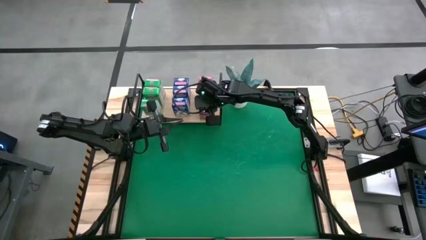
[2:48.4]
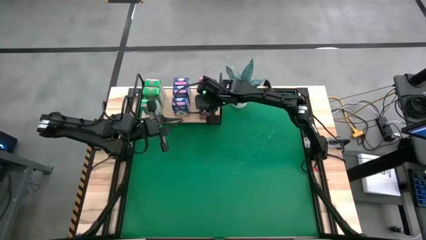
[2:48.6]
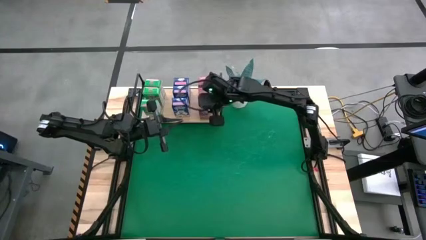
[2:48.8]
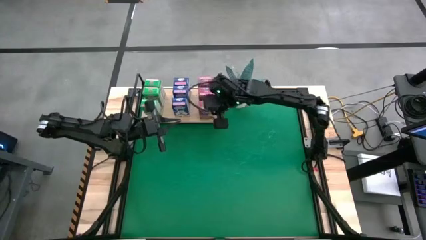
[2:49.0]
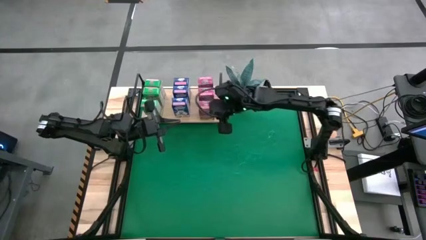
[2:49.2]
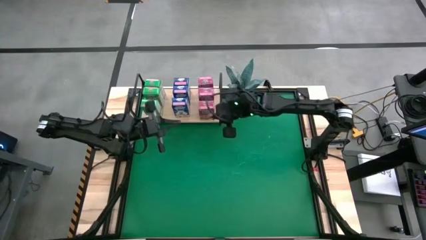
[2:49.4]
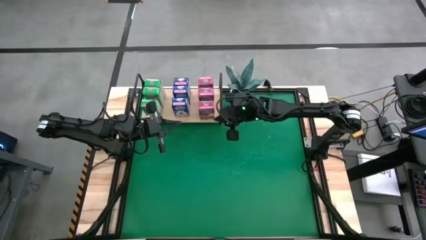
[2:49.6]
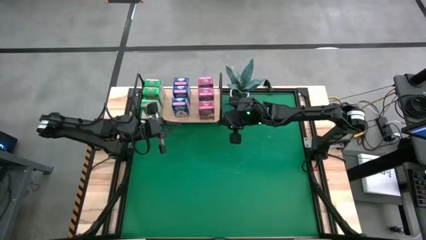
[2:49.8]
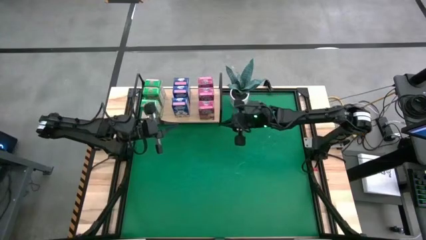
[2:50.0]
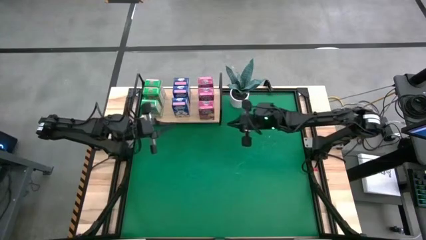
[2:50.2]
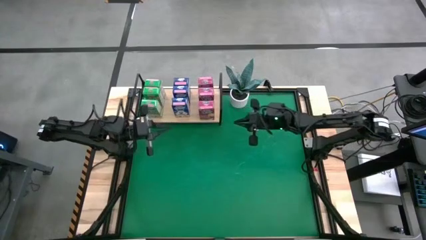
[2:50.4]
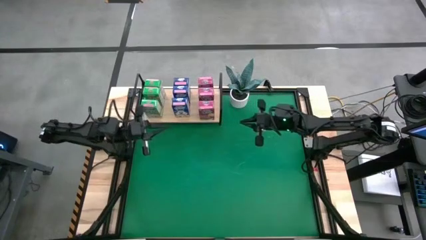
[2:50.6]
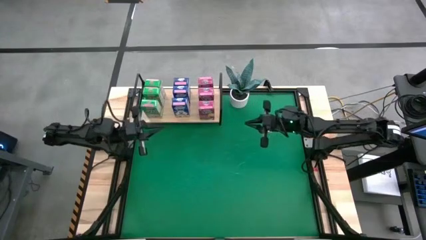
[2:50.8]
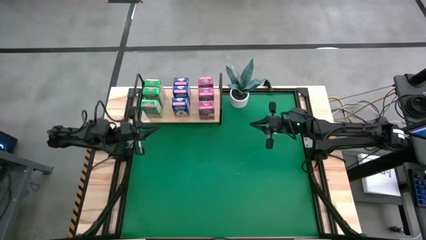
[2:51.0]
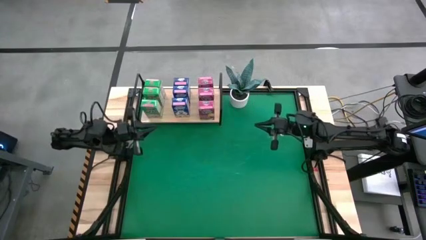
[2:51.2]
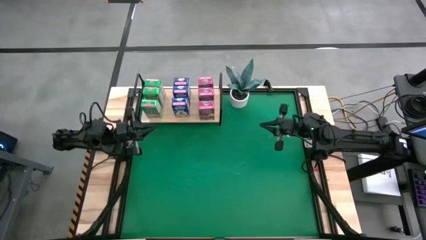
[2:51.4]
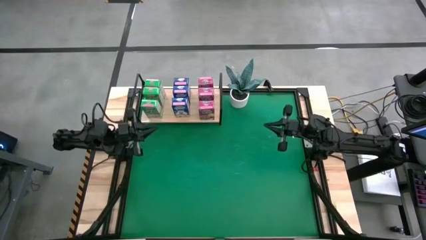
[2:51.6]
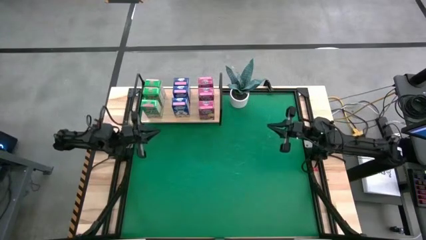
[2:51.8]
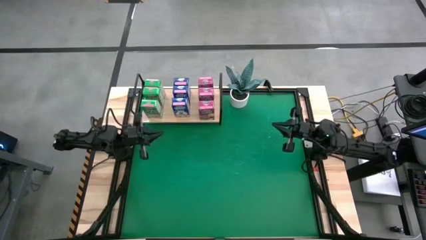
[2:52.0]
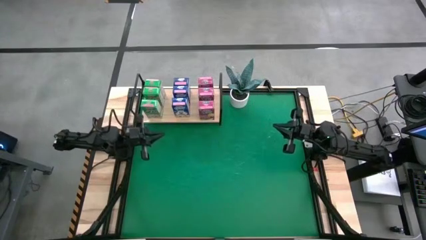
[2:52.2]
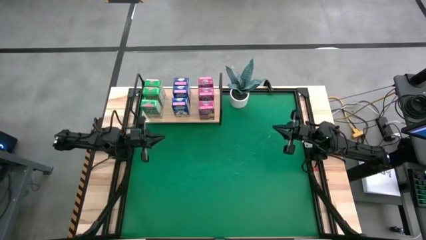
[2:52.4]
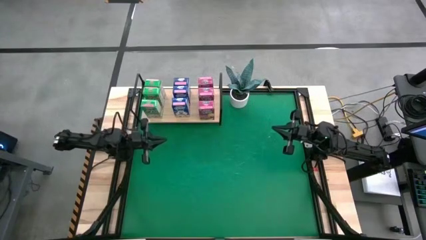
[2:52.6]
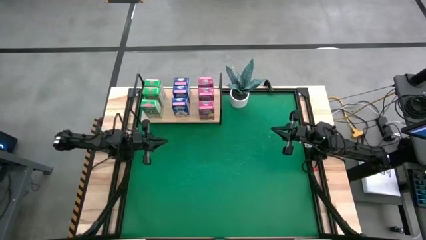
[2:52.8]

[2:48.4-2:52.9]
Task: Stack cereal on shelf
Return to Home Position

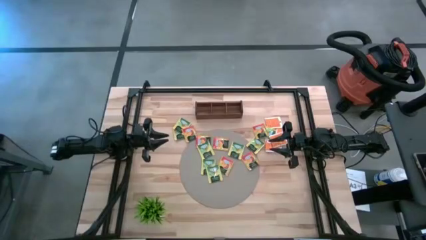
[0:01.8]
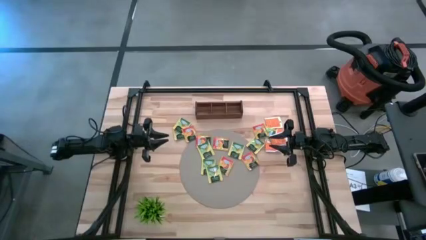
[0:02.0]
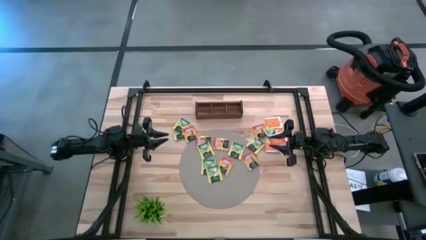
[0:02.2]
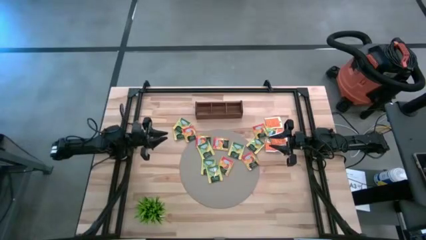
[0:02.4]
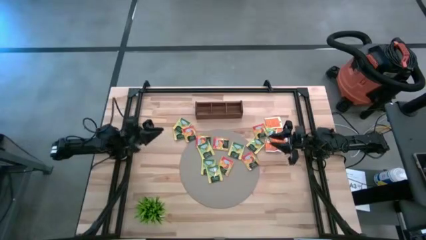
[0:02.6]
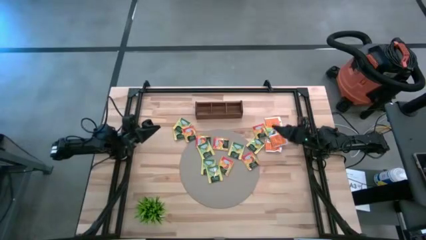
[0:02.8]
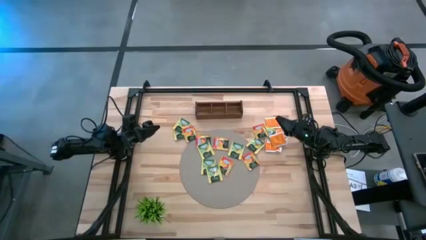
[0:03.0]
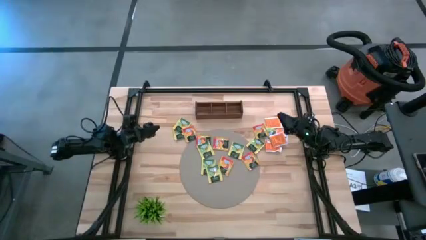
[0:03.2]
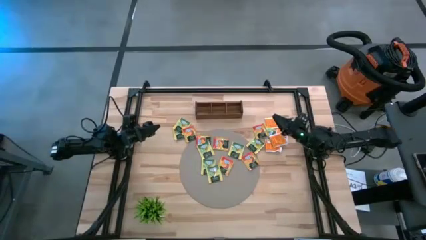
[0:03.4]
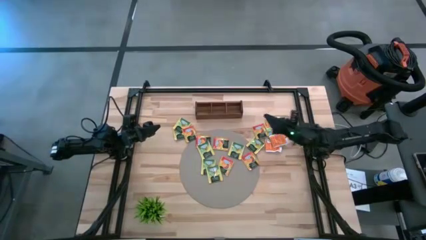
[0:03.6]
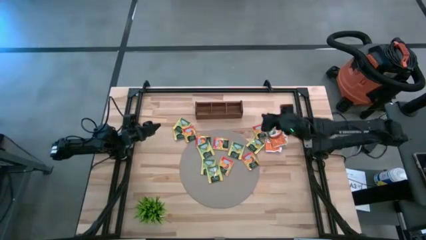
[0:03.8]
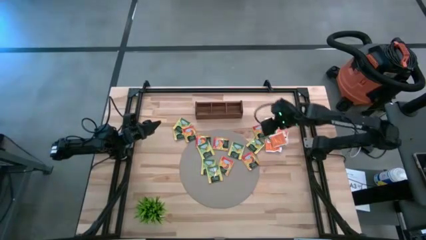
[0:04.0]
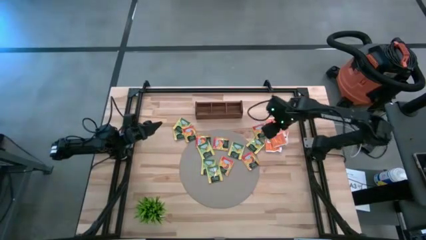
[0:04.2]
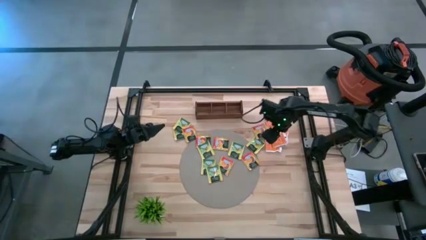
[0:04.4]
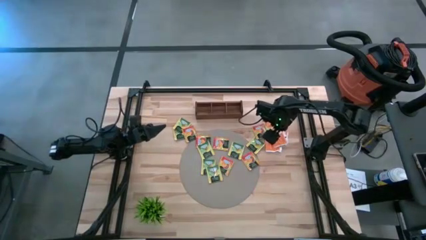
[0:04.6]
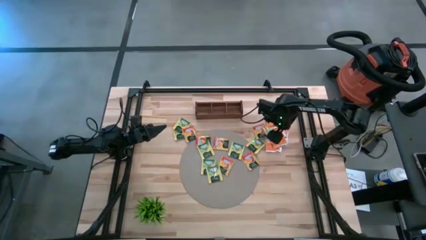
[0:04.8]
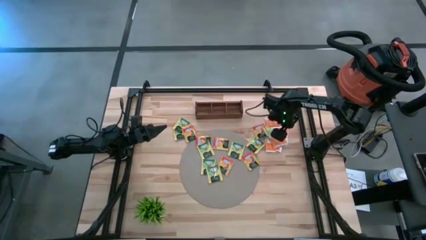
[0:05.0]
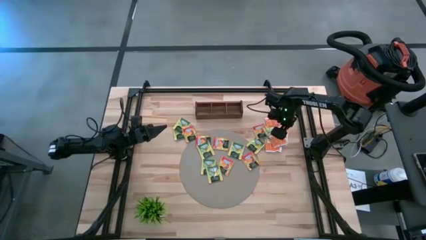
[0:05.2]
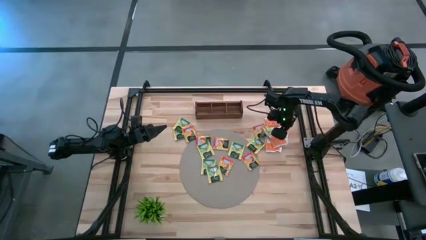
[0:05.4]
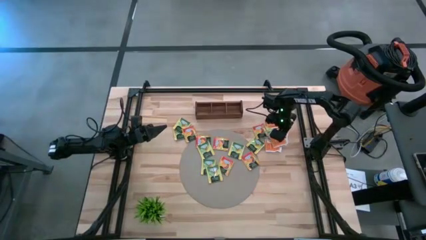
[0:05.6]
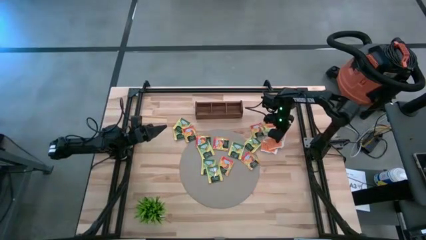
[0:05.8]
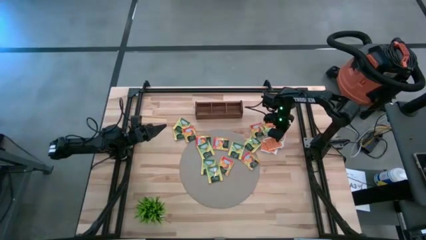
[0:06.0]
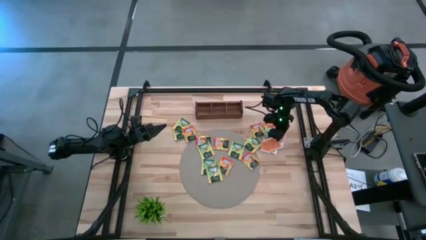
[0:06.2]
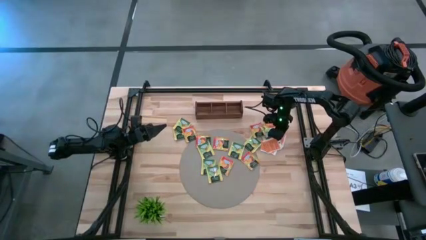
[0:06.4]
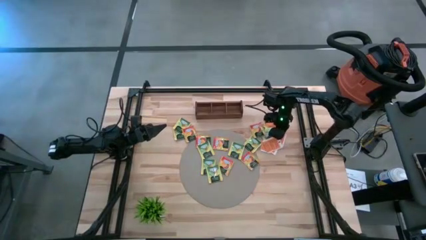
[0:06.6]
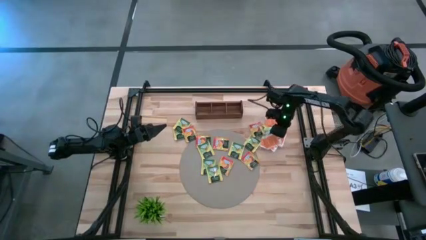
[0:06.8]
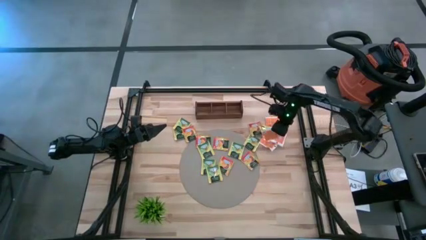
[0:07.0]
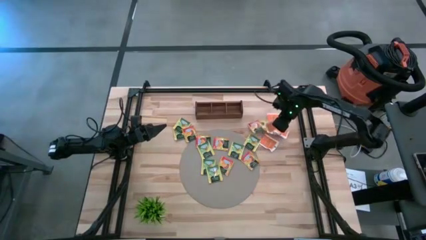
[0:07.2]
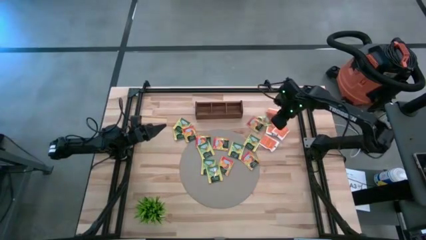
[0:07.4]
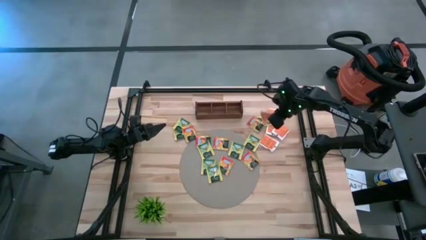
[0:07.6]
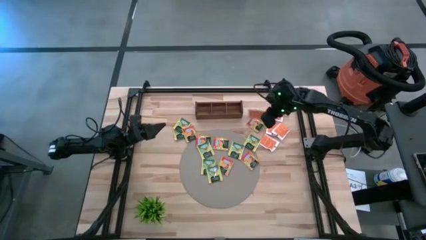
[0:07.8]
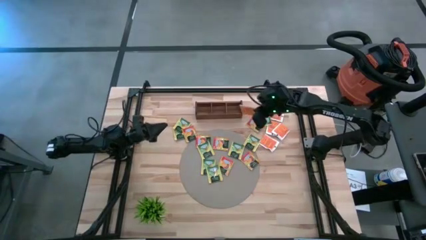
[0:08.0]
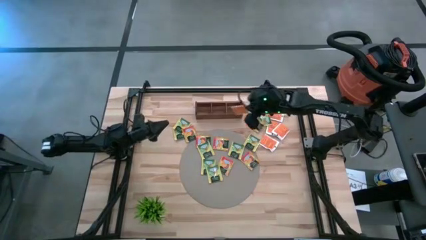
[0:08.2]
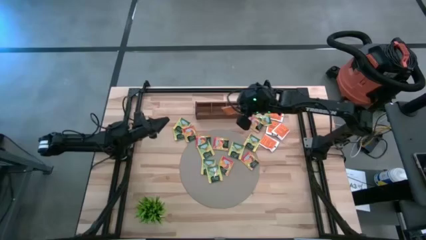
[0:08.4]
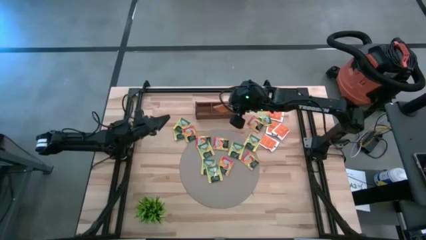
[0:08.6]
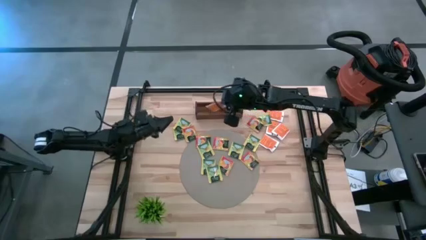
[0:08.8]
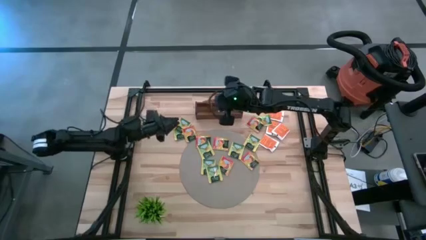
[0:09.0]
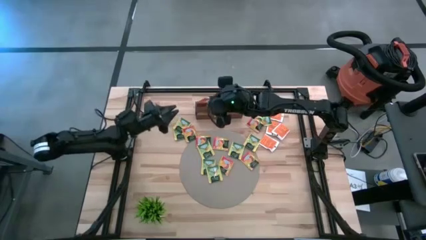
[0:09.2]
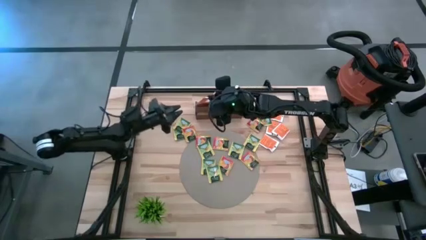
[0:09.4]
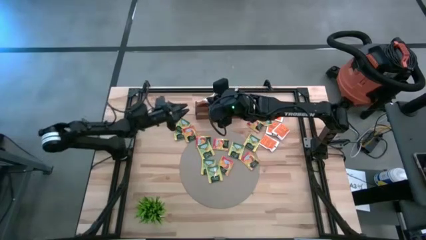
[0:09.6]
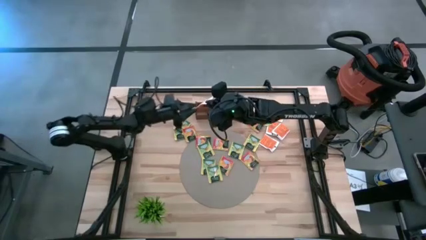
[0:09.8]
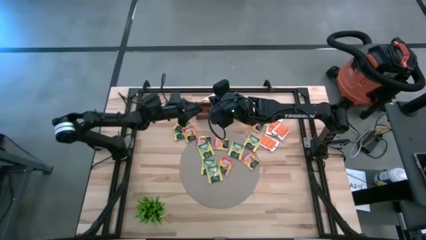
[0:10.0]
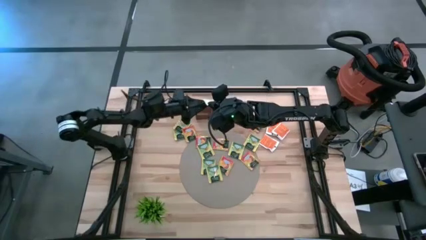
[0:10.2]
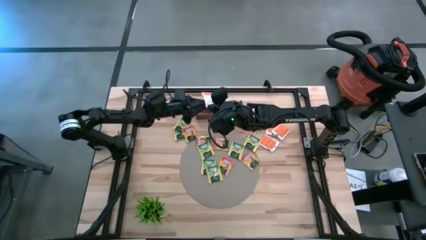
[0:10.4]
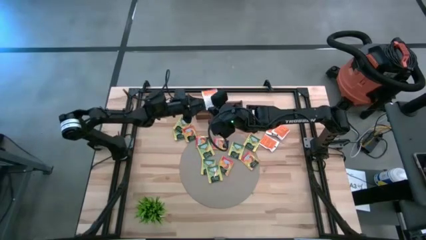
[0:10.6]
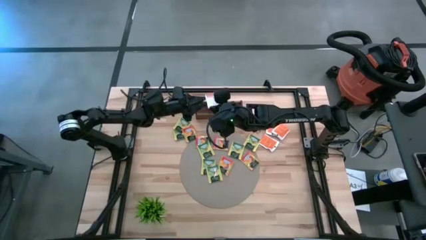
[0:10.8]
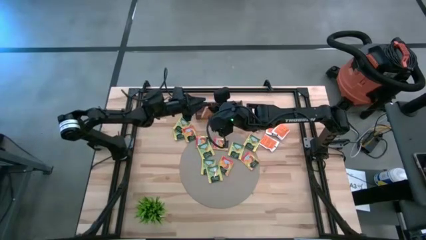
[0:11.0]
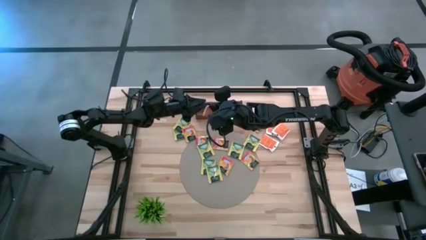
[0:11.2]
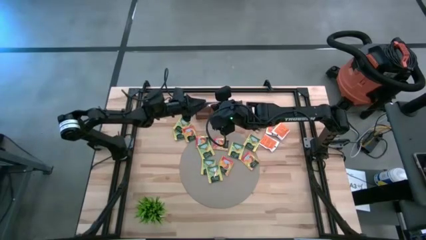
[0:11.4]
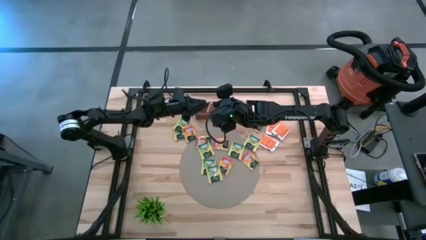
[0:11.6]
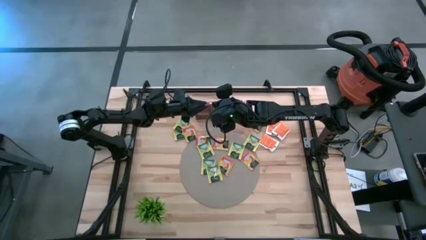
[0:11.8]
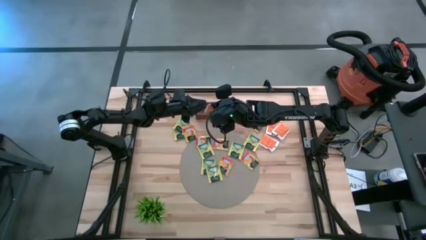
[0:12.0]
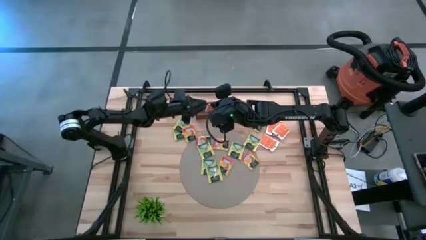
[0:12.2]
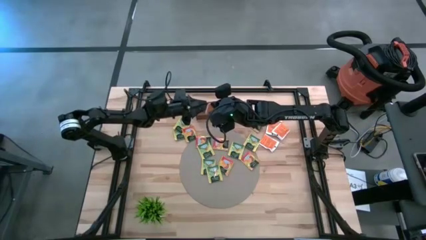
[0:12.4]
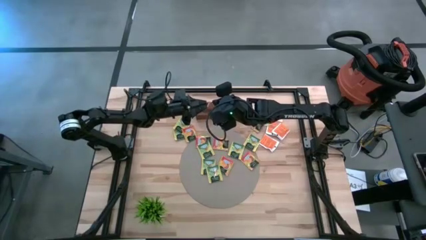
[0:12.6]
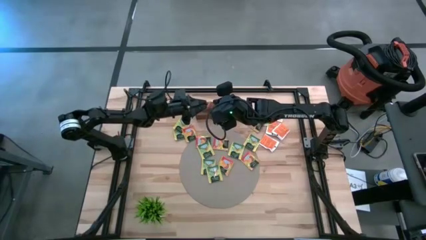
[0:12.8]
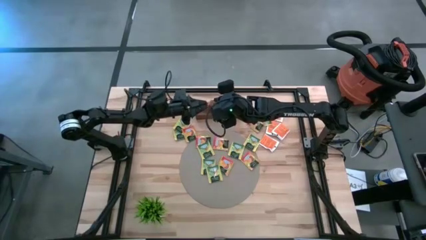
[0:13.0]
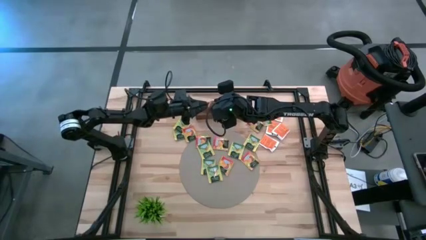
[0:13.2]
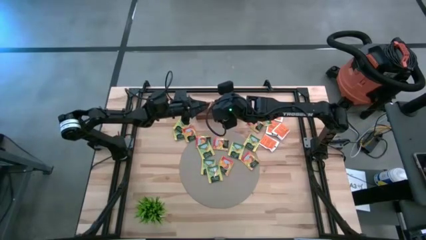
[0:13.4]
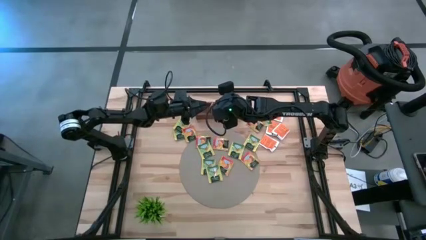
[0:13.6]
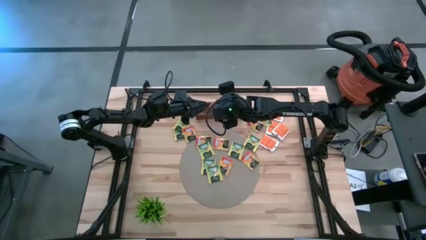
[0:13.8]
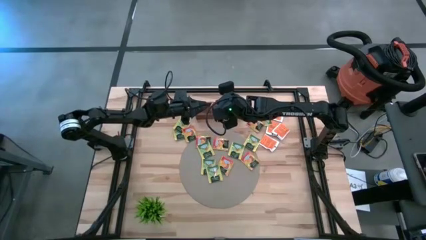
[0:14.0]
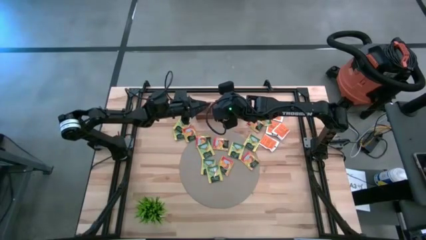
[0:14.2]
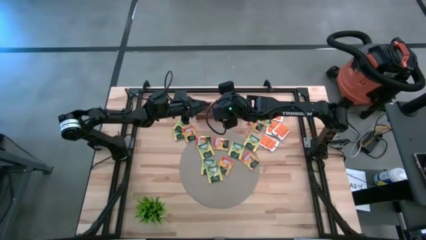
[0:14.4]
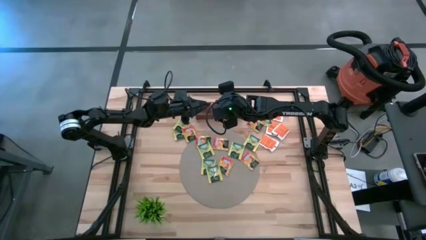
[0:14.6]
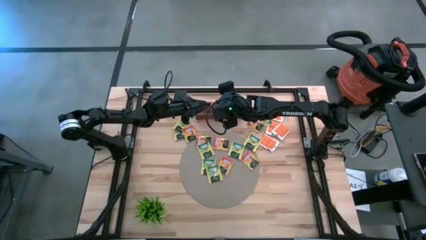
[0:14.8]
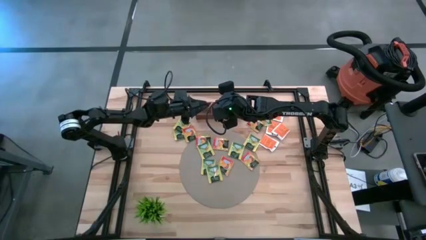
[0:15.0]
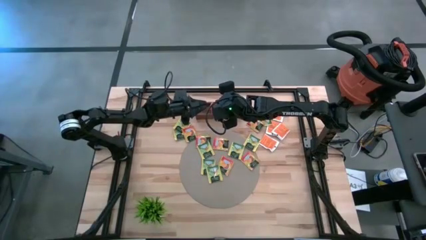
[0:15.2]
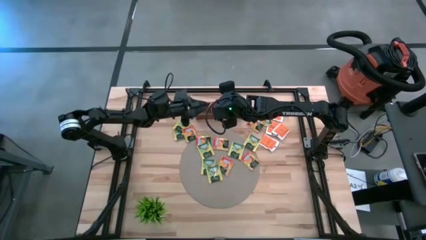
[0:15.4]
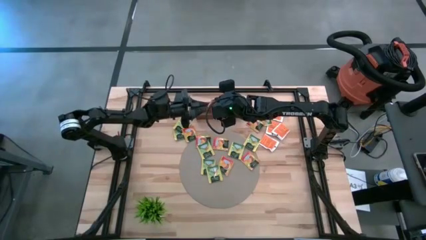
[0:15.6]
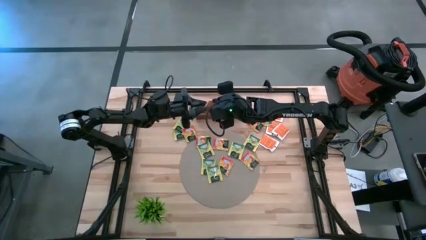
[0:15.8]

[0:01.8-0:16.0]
Task: Pick & Place Tea
Put the white tea bag into the left section of the wooden organizer
